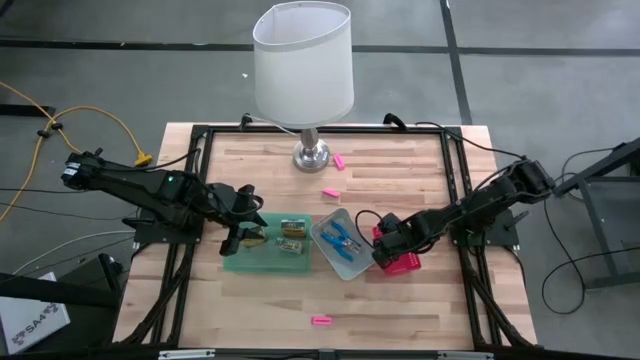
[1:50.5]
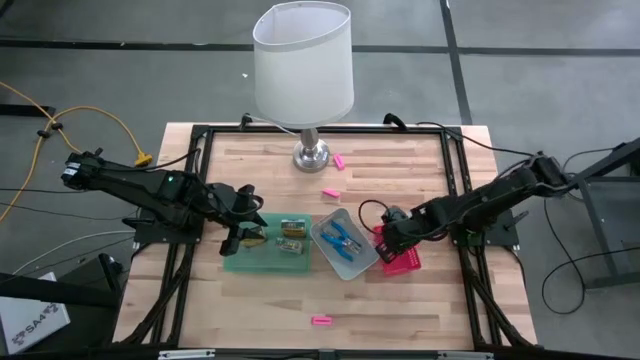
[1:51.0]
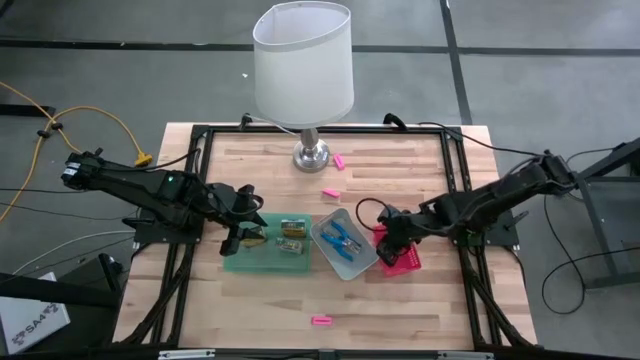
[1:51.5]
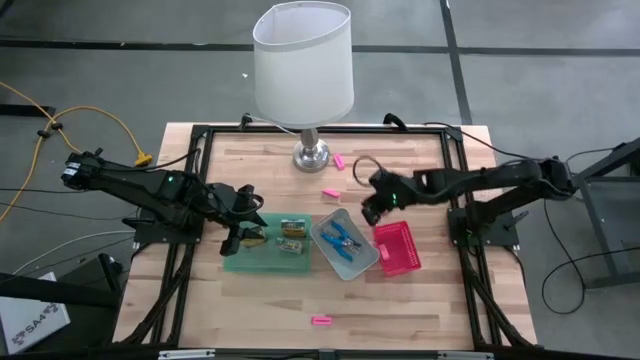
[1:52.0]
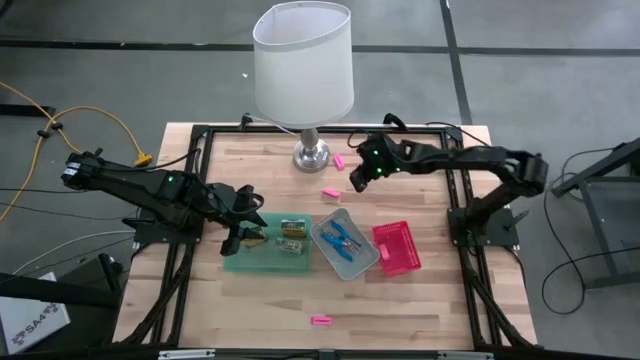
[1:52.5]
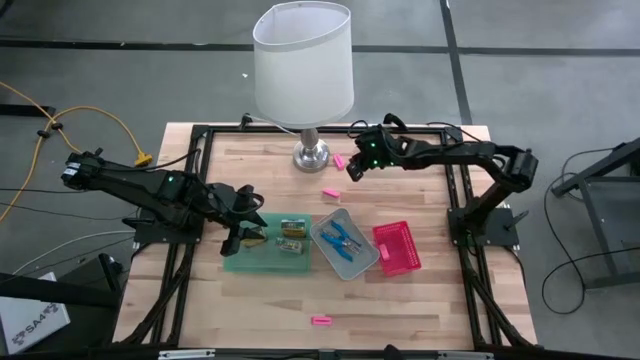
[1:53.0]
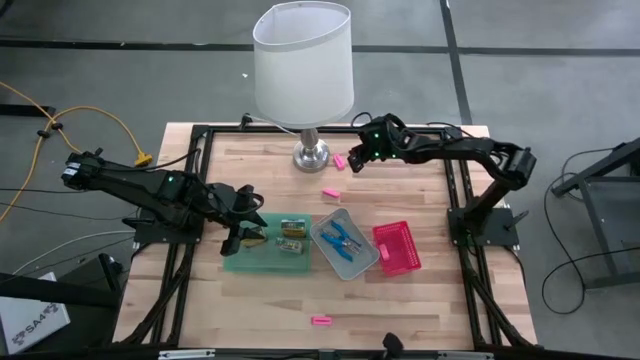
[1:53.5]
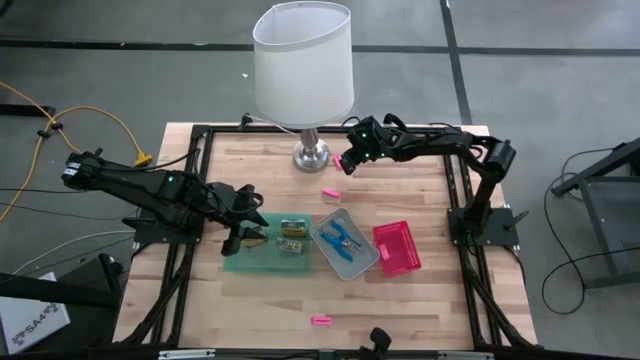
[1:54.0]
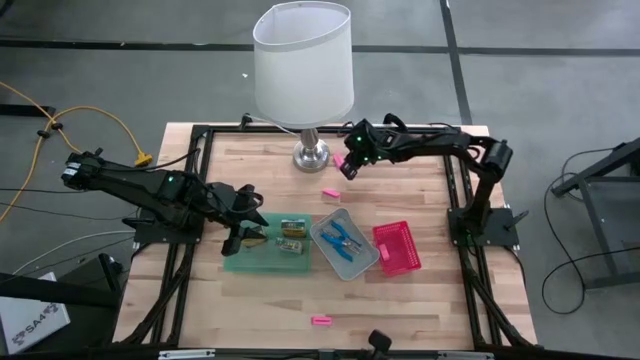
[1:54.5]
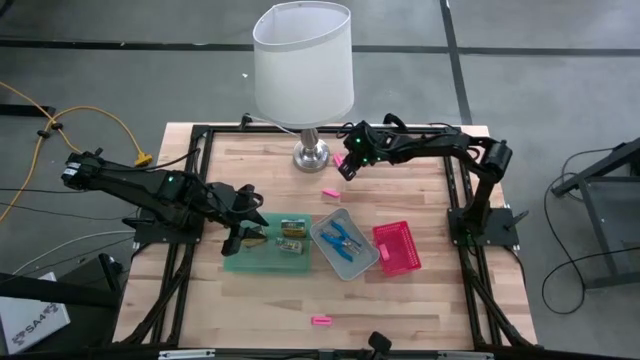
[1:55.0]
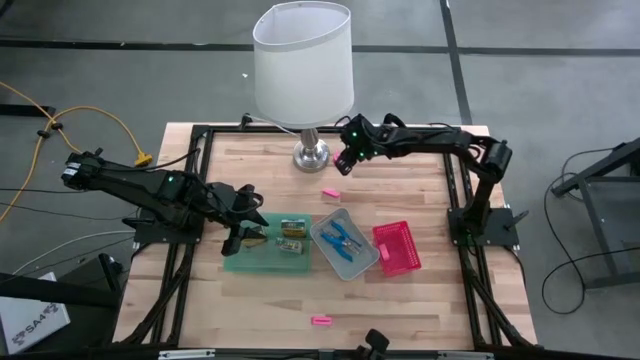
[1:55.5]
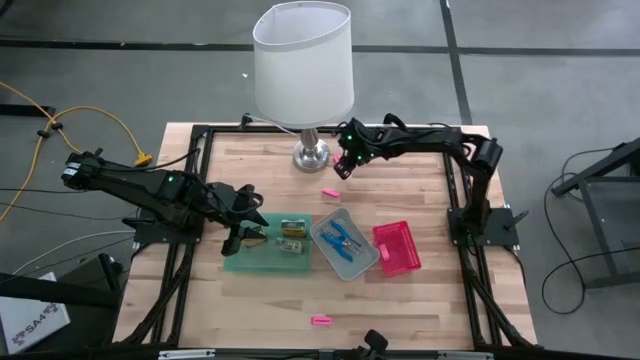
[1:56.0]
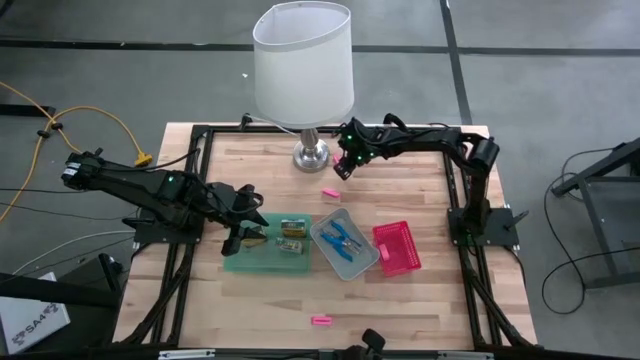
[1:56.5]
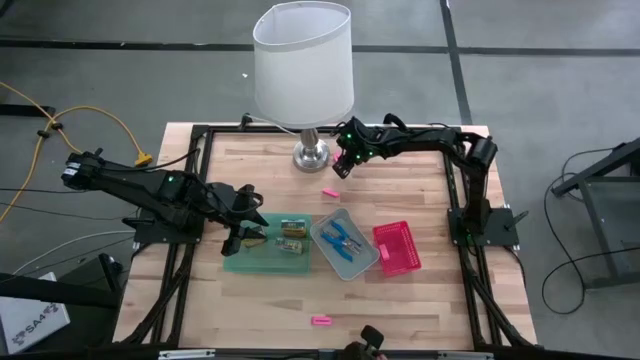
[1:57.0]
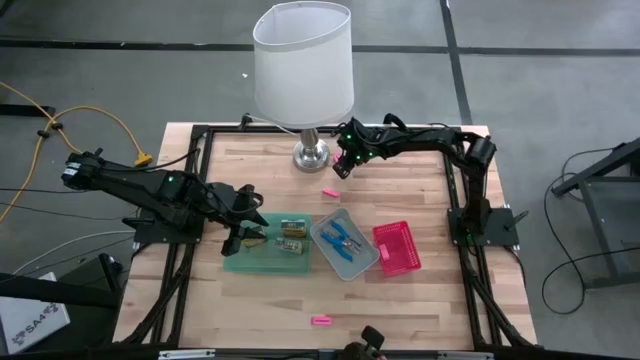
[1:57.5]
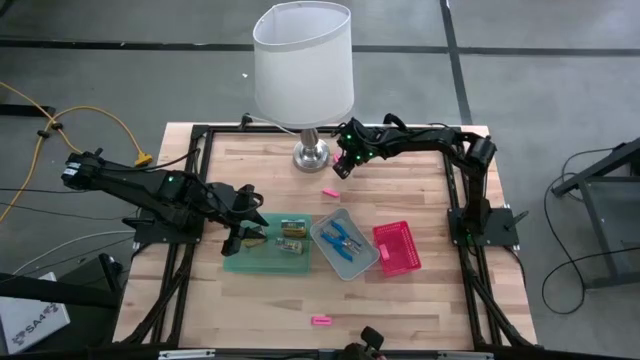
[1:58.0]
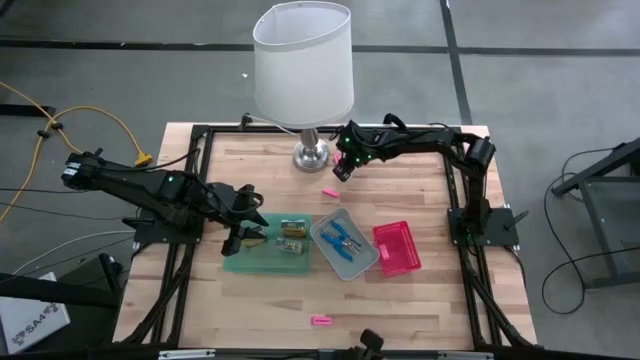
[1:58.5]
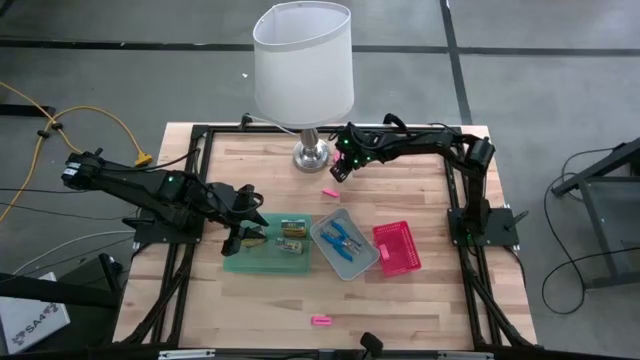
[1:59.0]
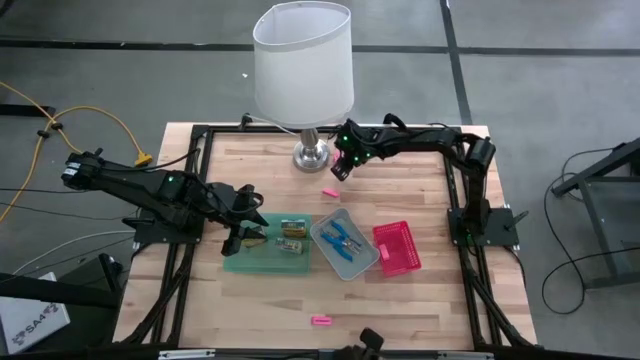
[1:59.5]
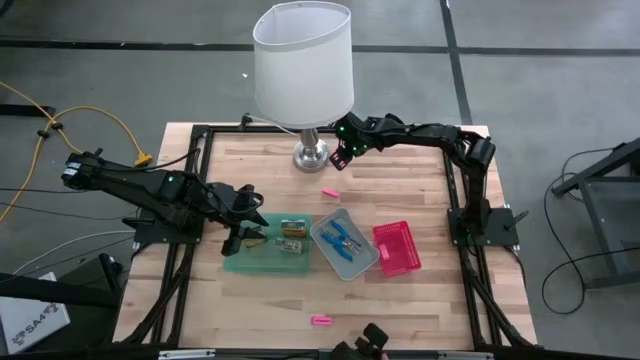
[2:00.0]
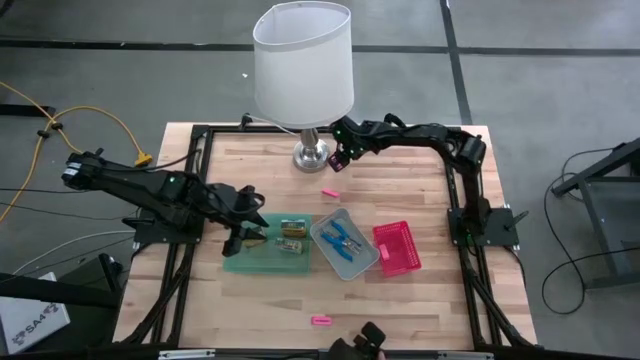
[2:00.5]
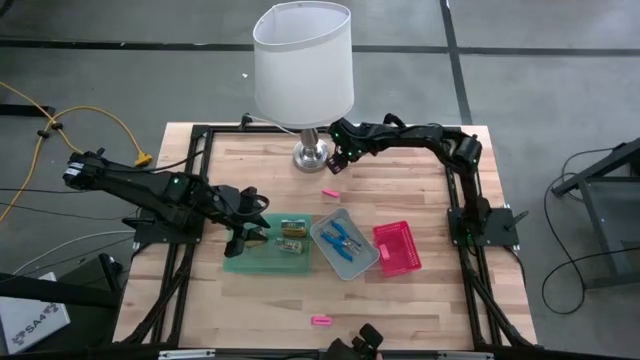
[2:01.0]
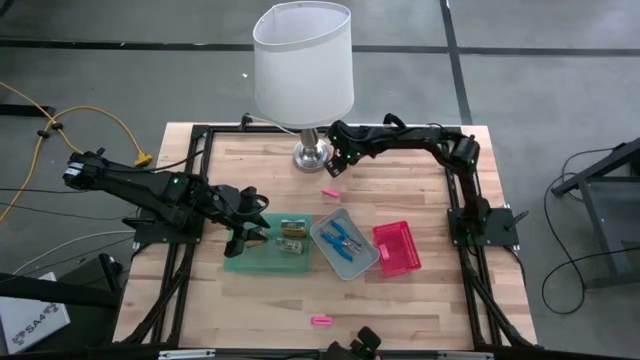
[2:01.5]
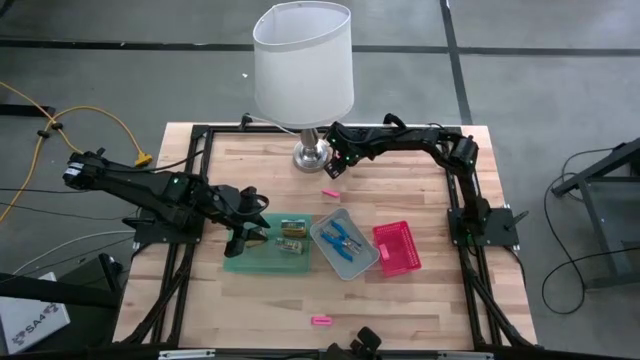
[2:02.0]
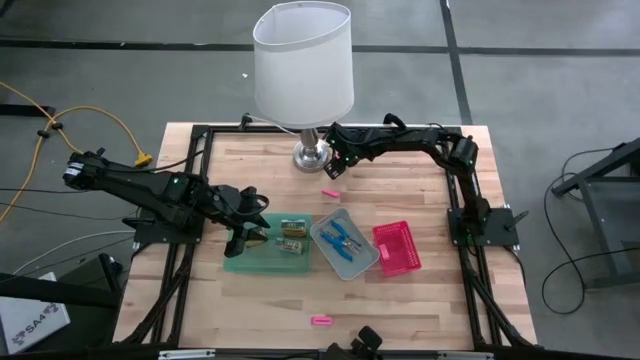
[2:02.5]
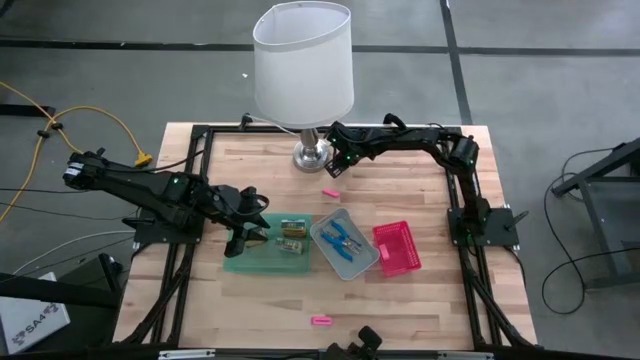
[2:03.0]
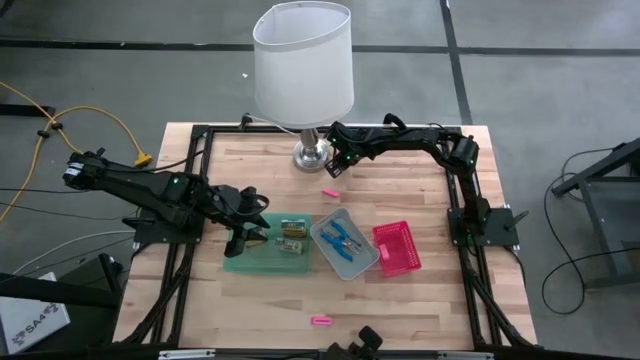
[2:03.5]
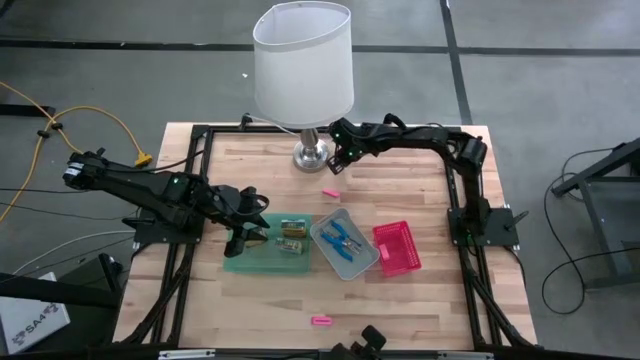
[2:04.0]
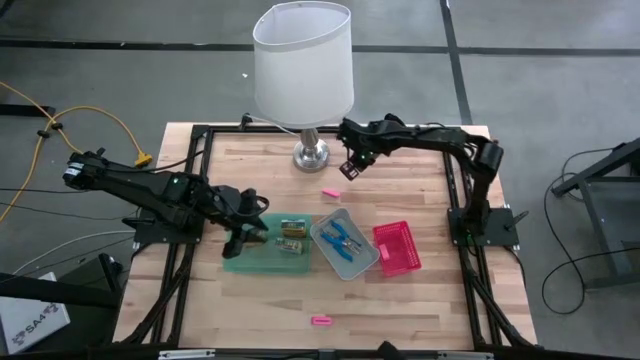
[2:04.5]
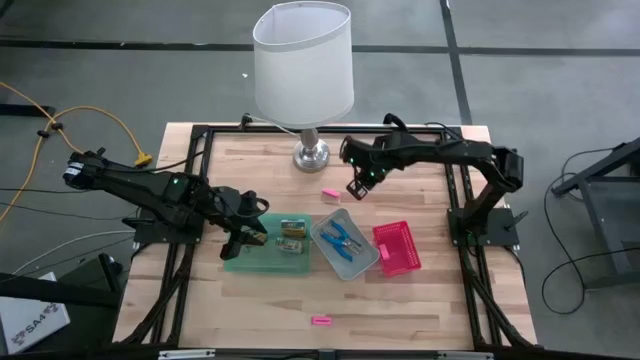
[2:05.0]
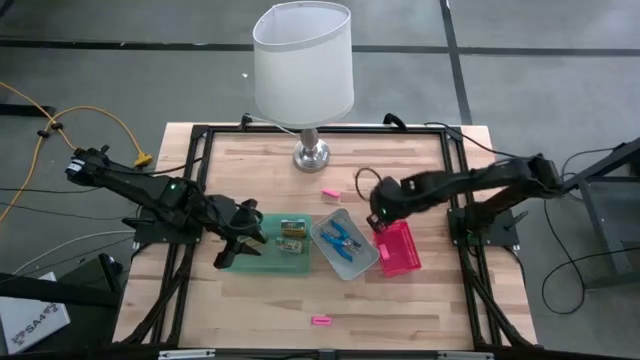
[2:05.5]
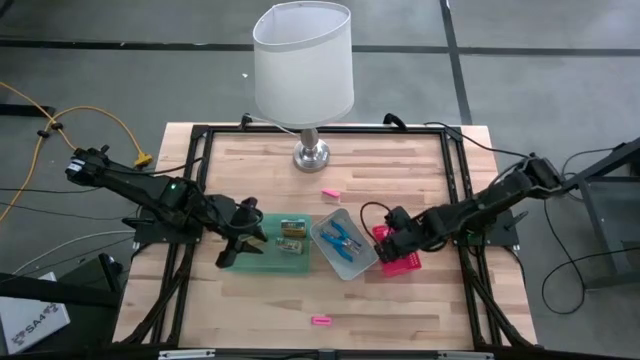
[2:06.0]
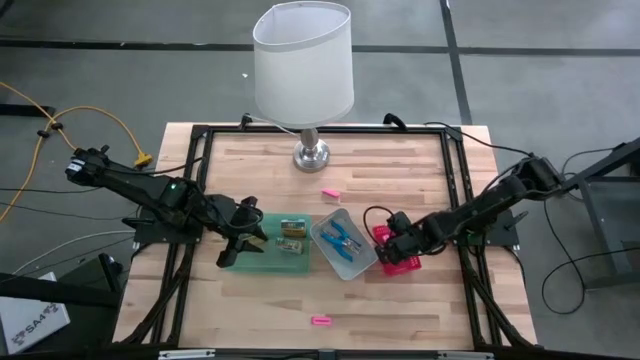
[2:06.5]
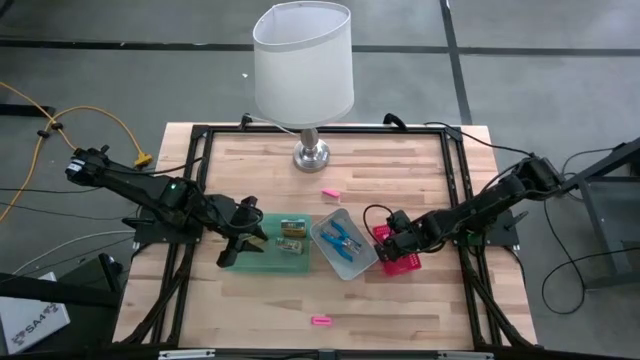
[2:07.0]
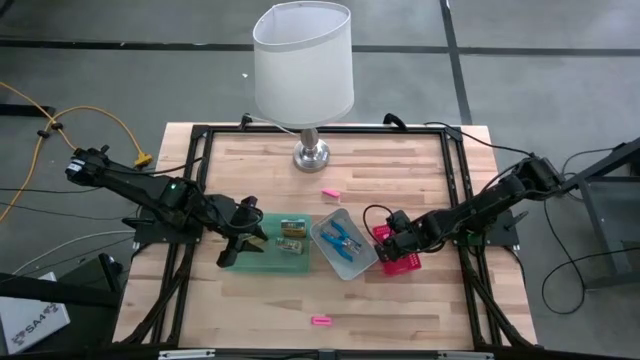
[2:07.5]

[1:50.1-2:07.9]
Task: Pick & Place School Supplies
Put the pink eraser into the red bin

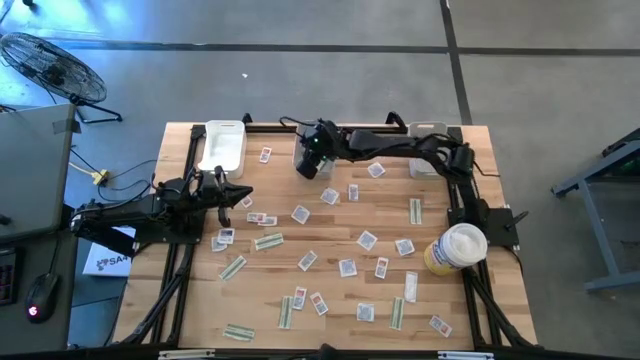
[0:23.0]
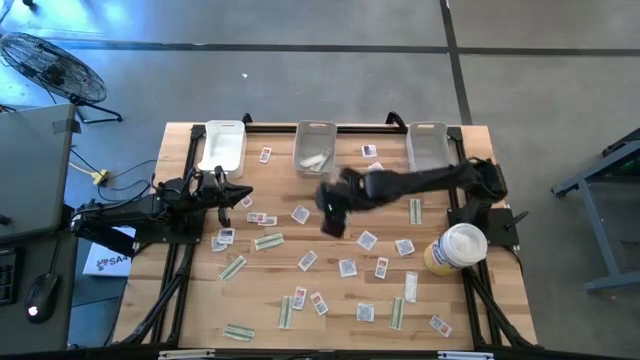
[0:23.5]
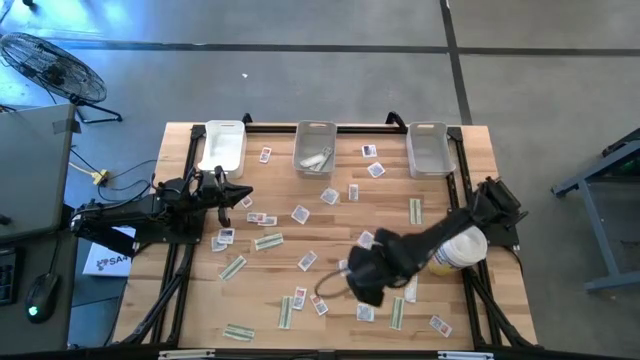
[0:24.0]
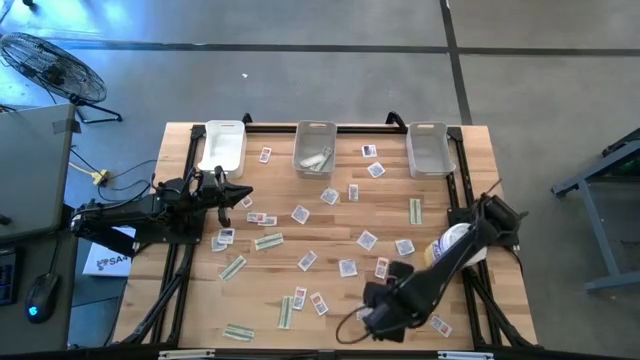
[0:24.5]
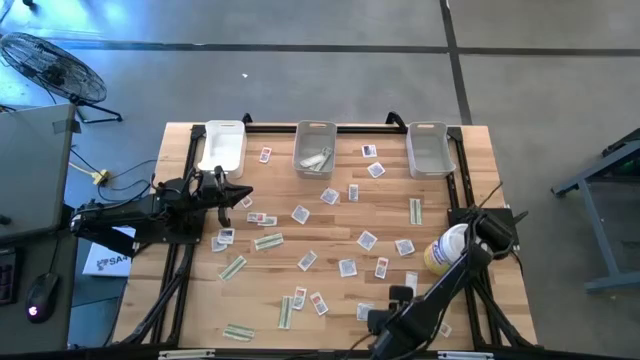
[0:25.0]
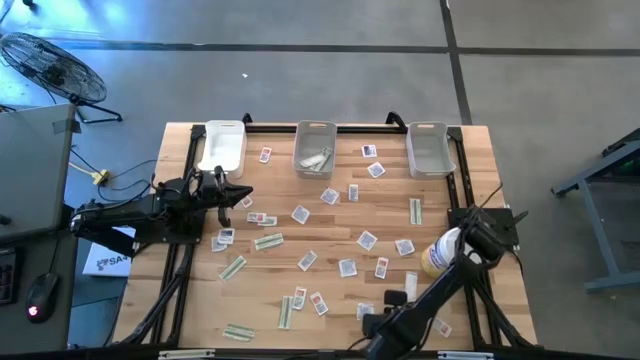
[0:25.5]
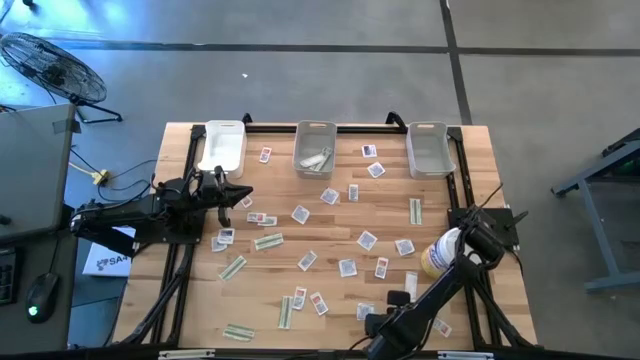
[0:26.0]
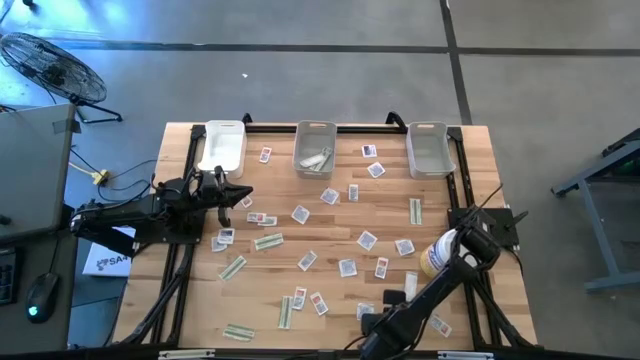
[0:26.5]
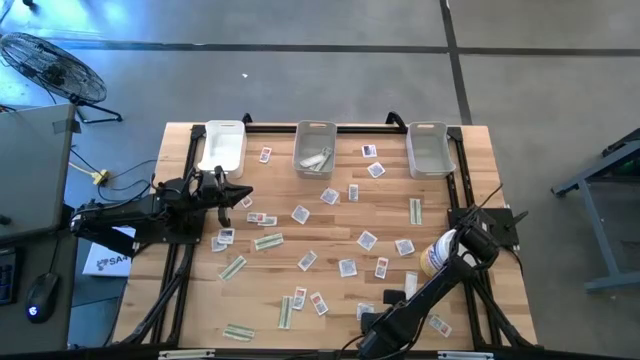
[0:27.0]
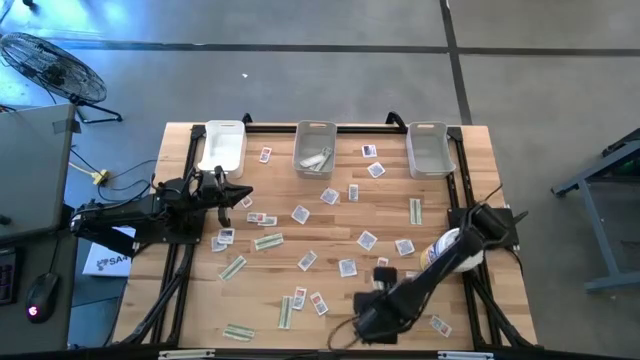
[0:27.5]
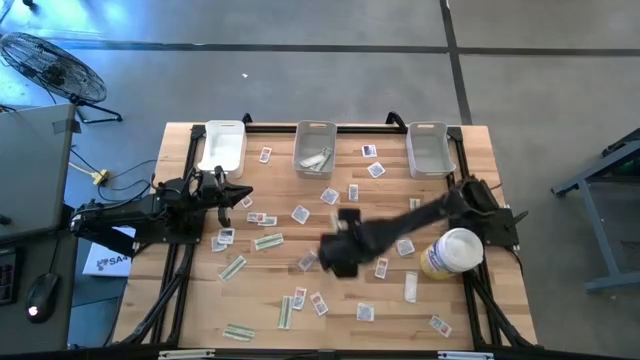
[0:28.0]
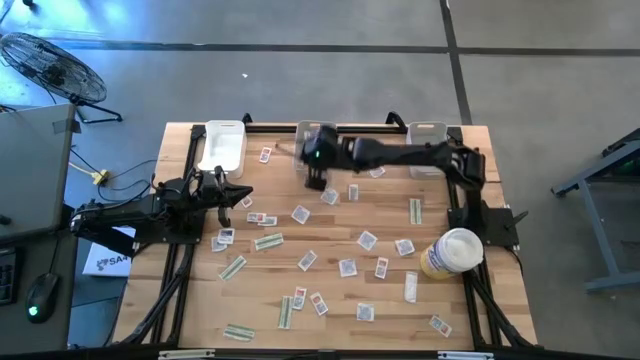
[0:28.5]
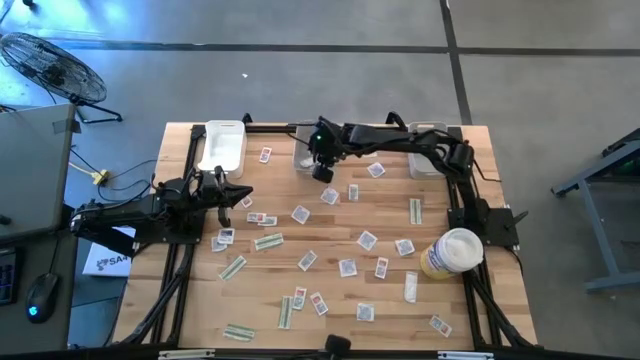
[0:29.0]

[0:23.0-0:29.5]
Task: Pick & Place First Aid Supplies
Put the green pad into the left gray bin
